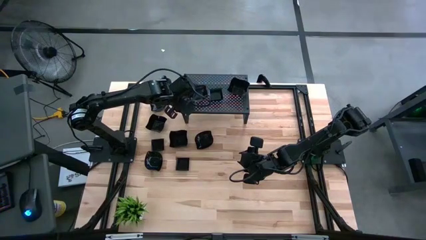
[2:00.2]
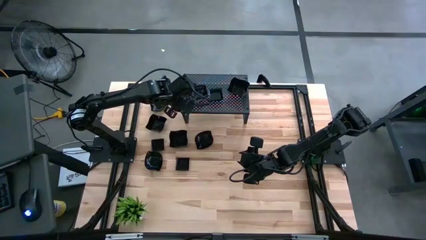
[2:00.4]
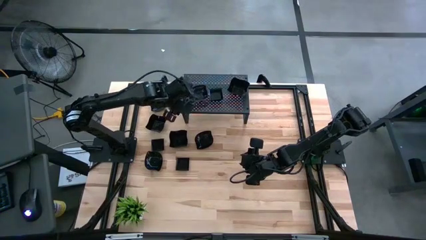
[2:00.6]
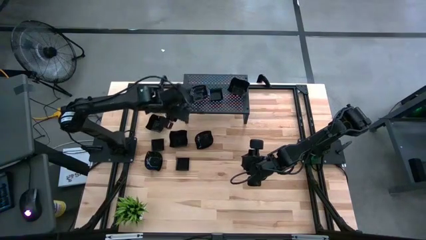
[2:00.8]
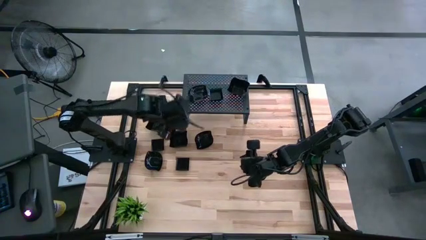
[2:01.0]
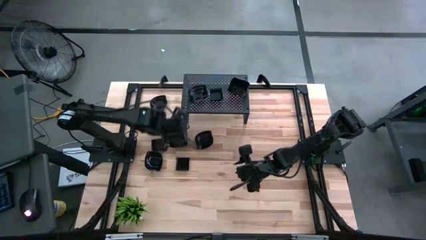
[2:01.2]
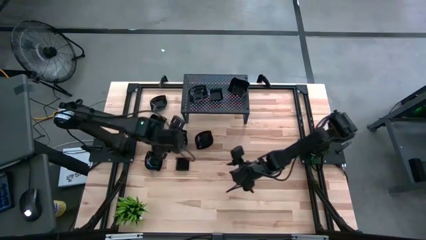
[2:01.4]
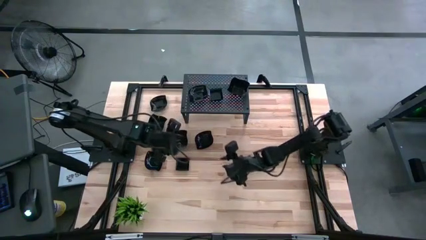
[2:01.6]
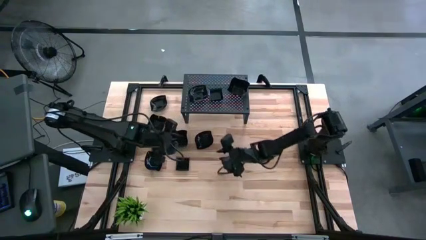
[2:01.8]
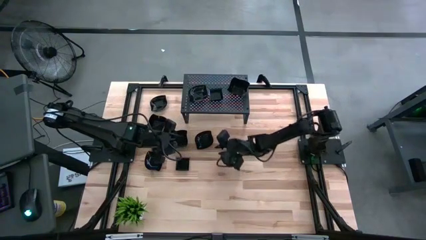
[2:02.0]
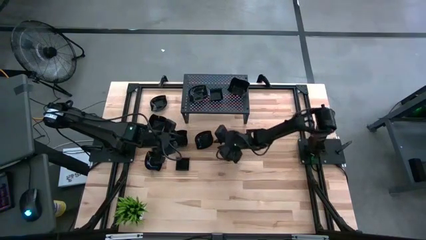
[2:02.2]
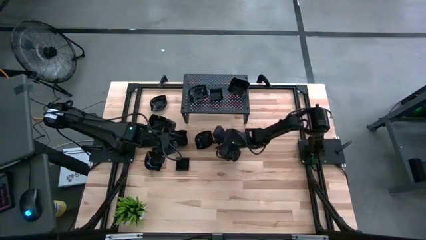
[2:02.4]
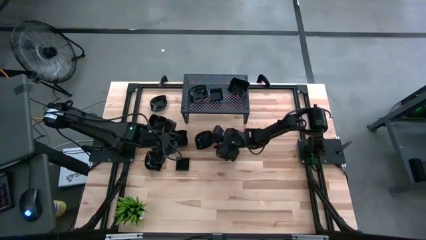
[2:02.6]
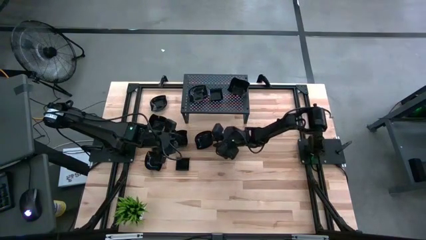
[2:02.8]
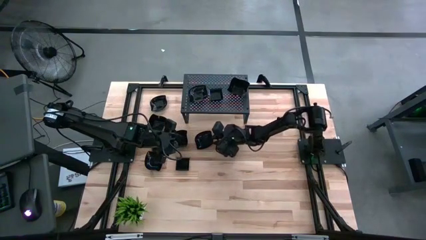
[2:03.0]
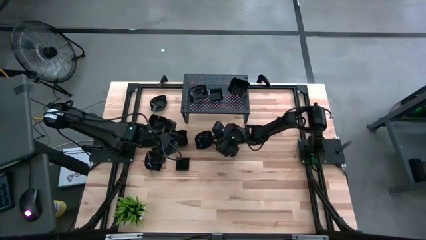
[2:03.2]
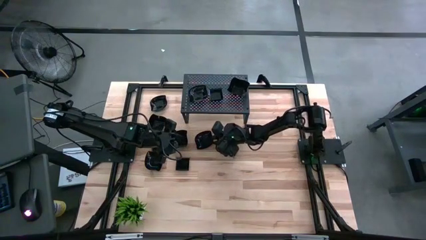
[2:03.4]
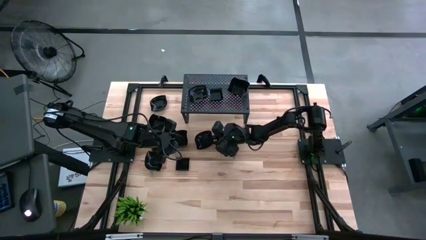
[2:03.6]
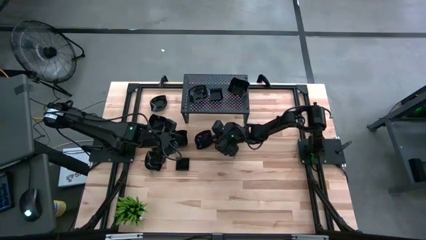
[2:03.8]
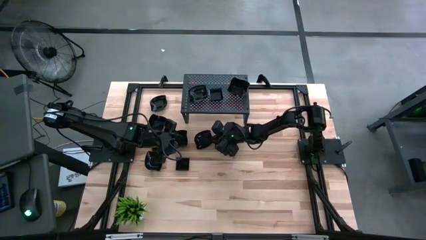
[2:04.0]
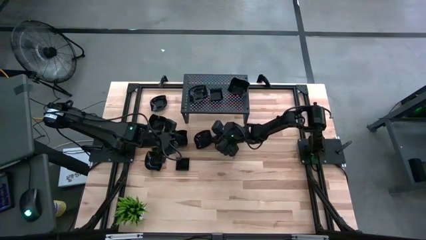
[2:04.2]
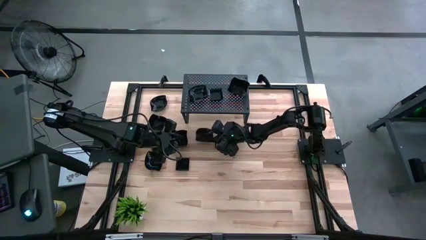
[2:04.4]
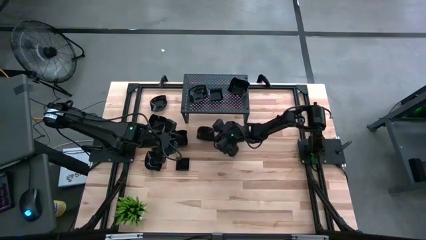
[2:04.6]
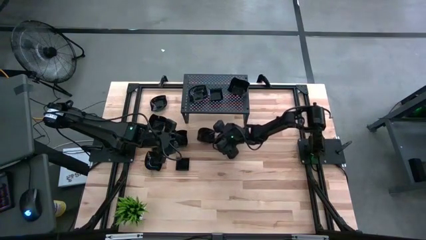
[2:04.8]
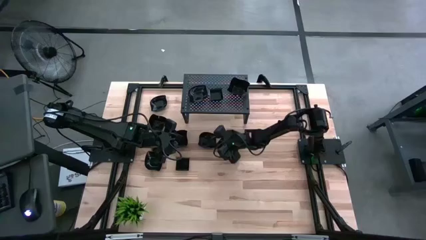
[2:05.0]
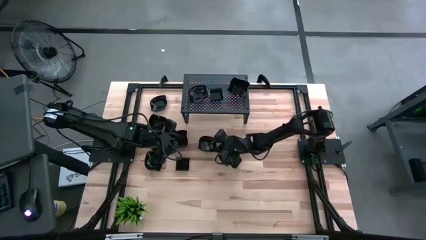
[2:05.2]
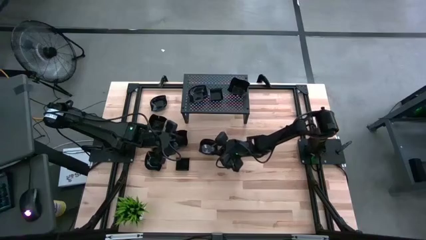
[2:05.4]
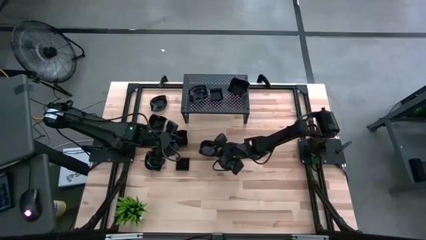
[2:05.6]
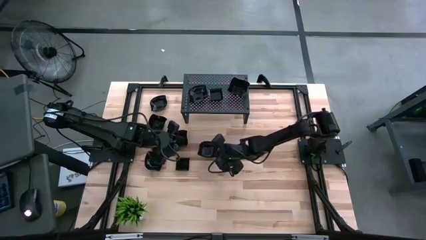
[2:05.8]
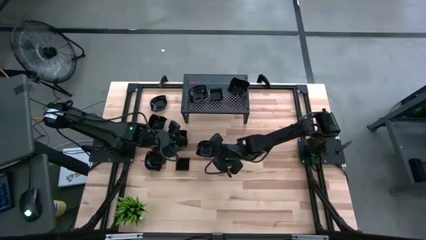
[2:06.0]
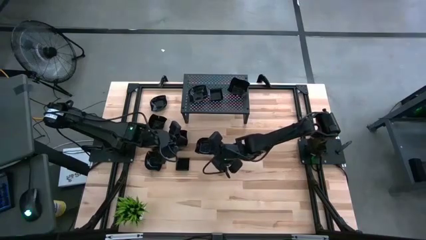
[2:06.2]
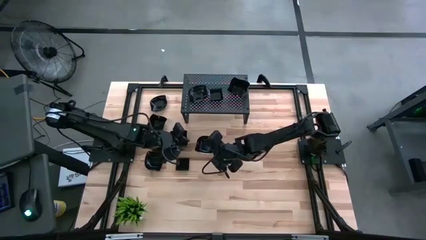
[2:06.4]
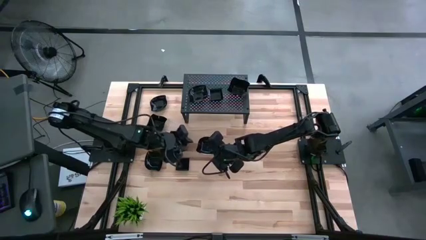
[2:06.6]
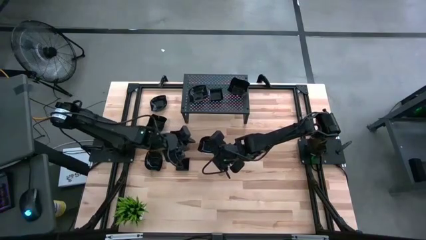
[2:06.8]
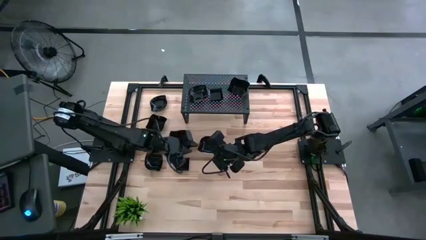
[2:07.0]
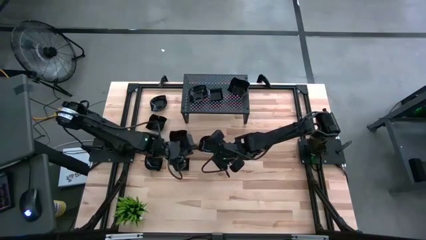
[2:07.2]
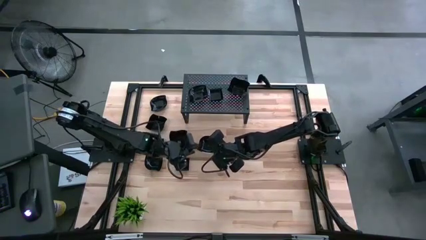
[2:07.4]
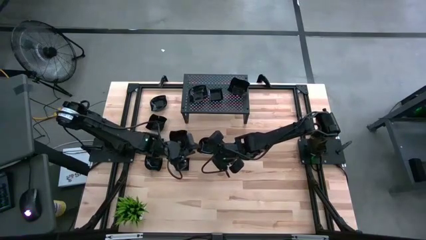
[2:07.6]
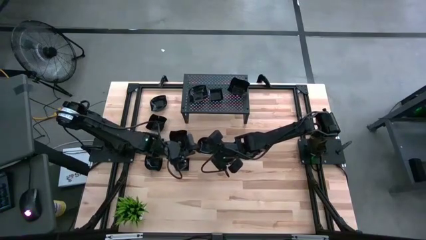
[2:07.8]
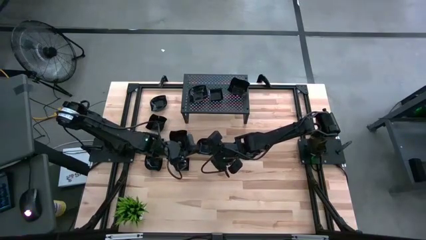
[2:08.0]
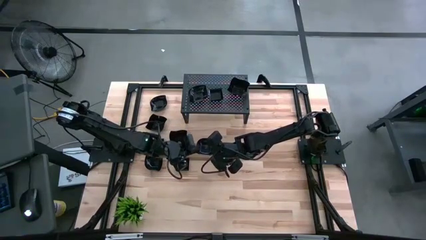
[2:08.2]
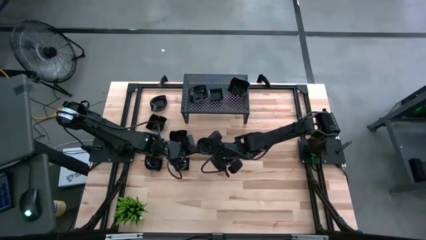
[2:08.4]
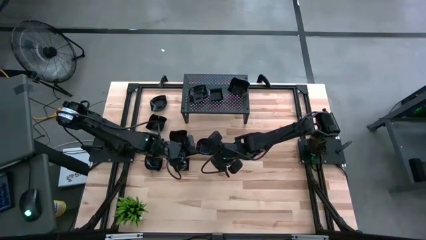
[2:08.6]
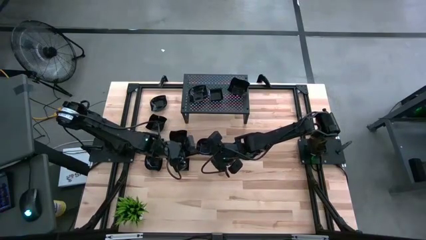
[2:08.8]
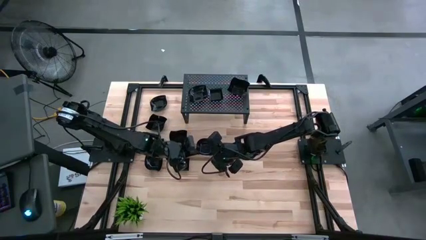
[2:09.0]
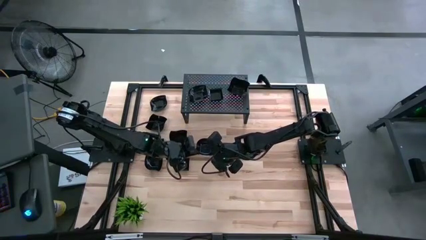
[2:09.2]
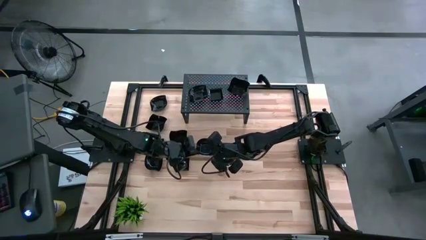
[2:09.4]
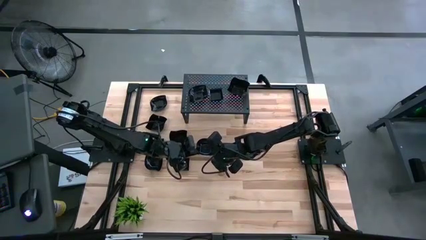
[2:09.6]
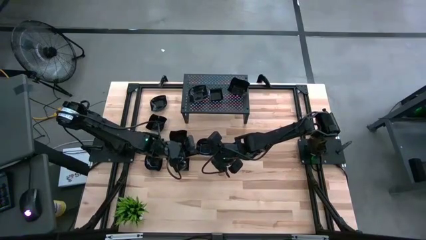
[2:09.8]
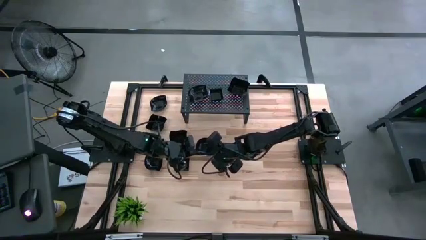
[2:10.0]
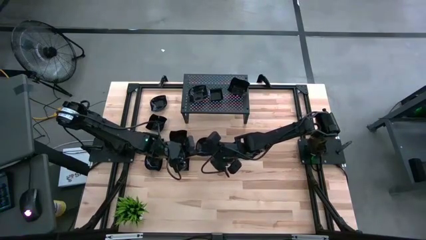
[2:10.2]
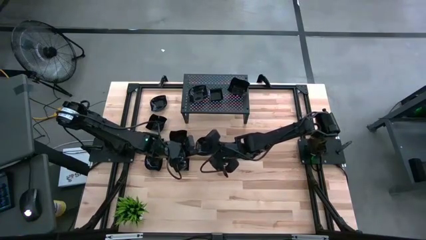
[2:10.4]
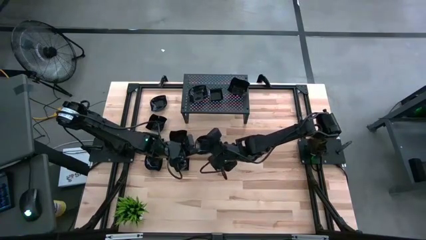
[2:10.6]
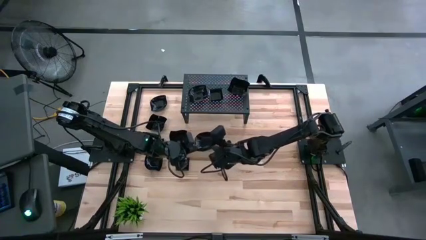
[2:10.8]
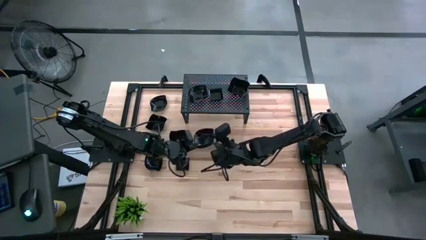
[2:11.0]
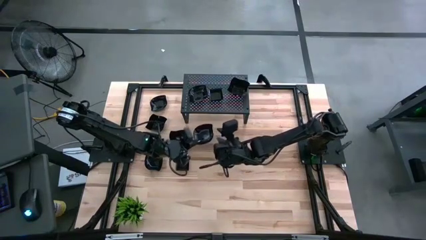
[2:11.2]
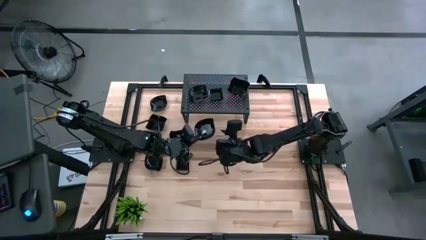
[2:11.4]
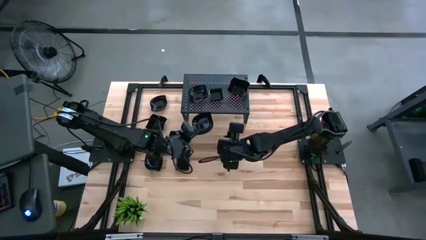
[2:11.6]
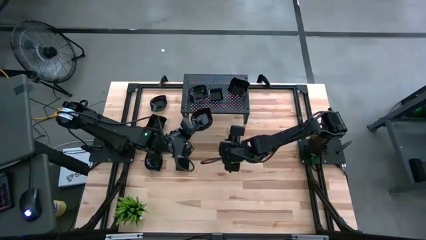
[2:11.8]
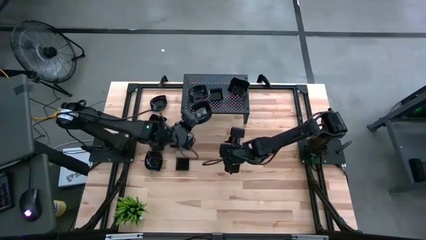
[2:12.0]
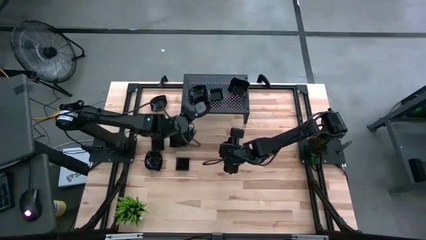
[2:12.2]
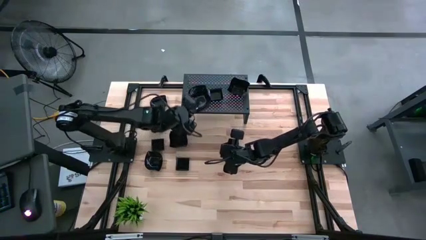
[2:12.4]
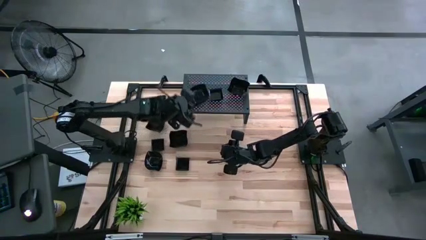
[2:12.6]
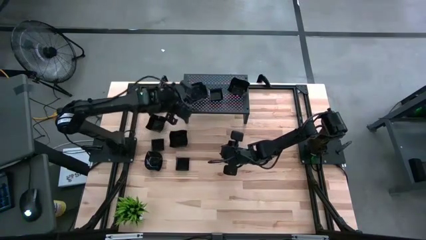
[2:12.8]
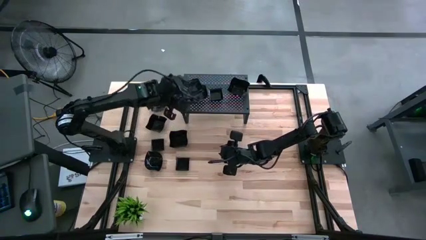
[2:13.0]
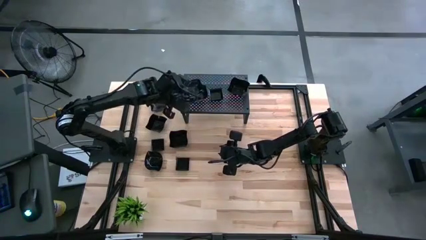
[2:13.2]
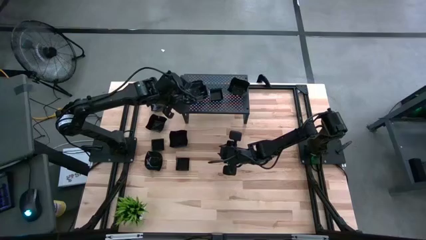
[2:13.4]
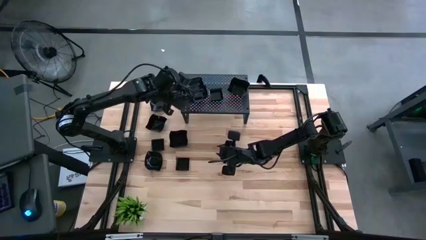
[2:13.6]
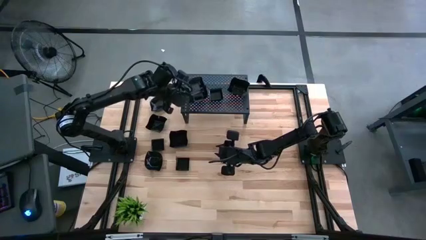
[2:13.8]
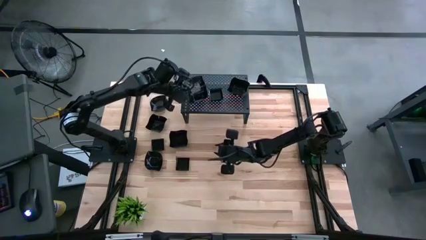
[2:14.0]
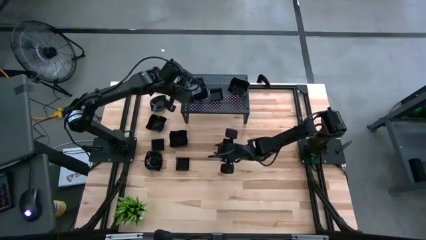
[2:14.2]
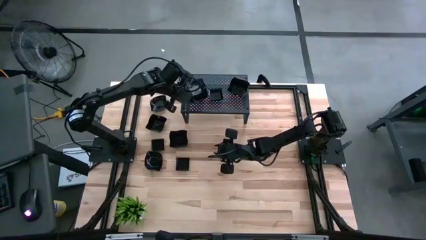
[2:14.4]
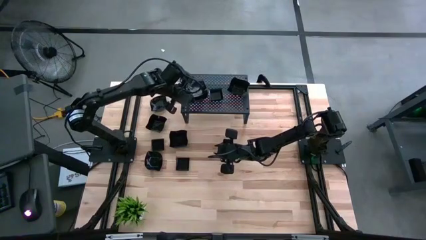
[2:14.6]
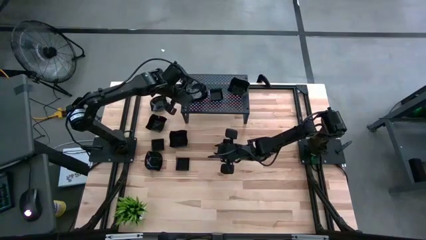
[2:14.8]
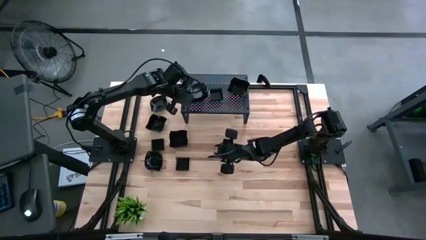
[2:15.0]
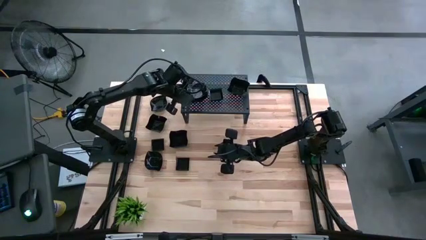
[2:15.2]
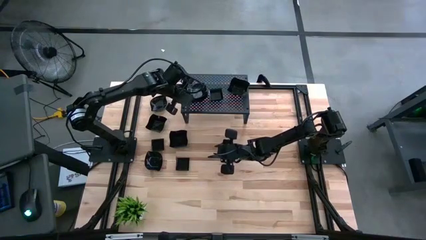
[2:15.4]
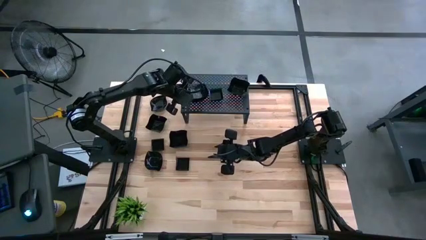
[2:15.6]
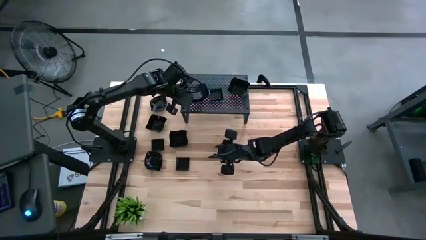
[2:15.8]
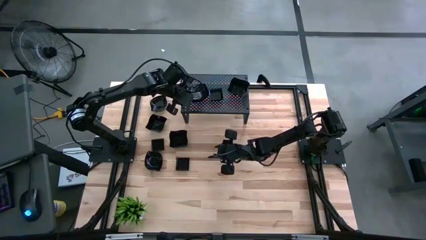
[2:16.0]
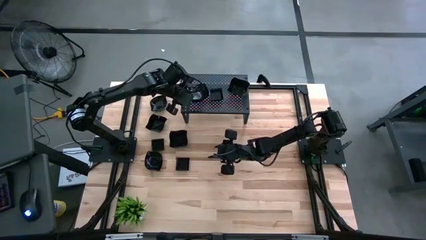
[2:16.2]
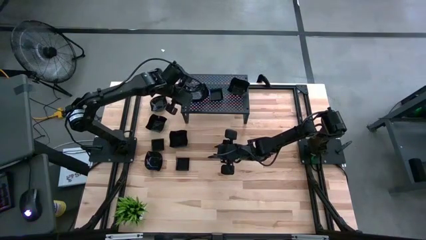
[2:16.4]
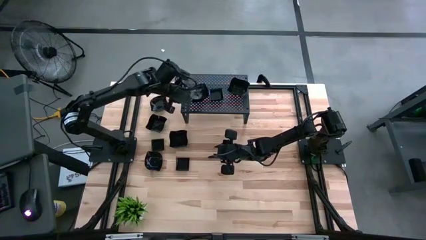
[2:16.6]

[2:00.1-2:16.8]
Task: Pick & Place Mini shaped plates
Stack the black leaf-shaped plate on top of the black leaf-shaped plate on the shelf
